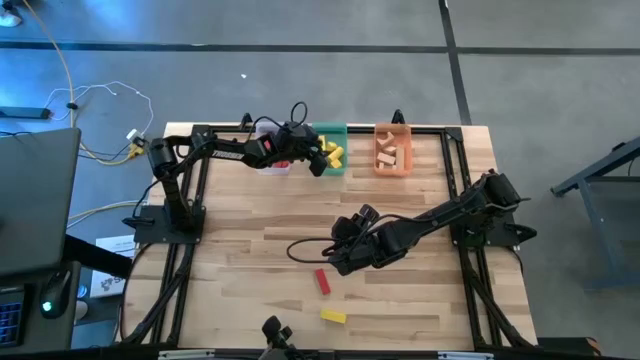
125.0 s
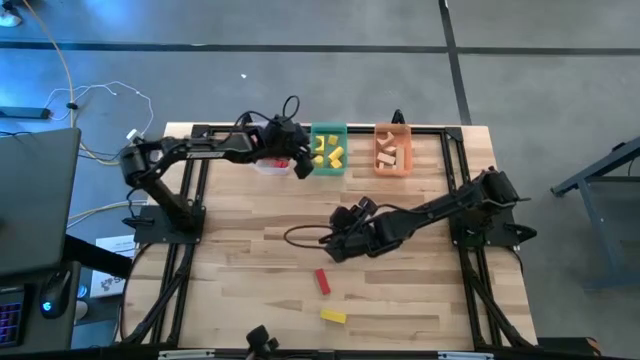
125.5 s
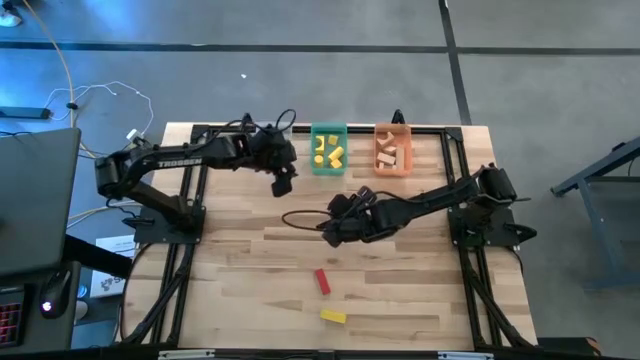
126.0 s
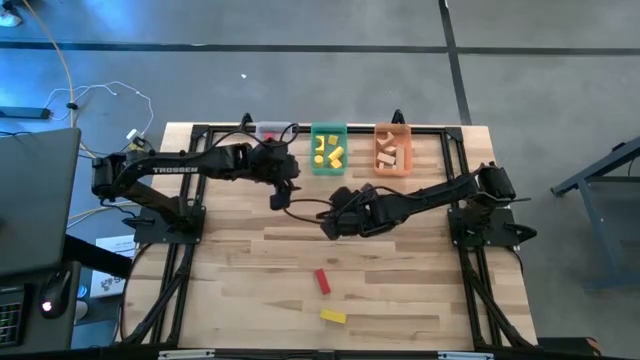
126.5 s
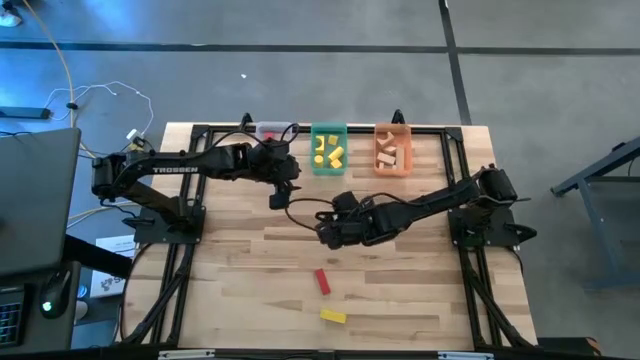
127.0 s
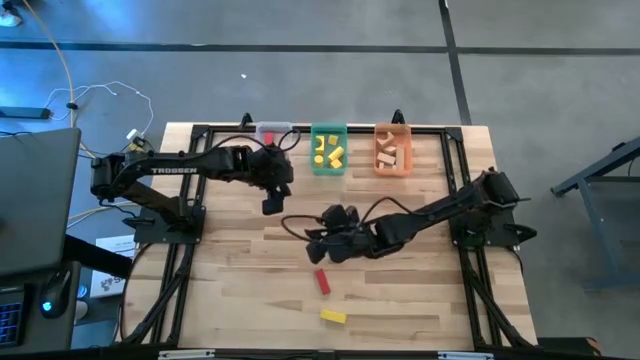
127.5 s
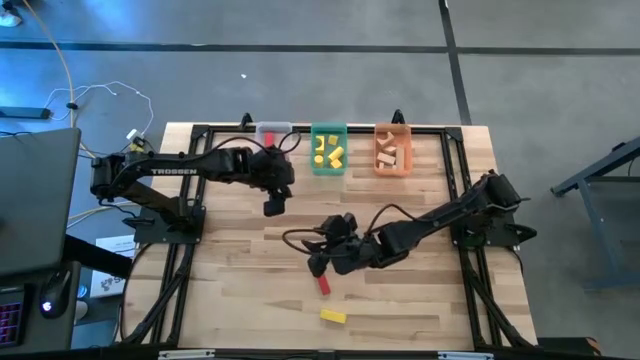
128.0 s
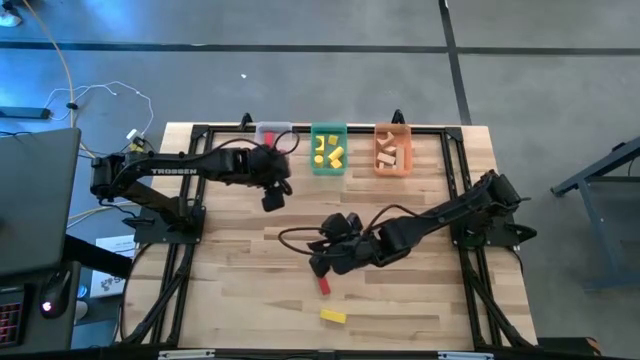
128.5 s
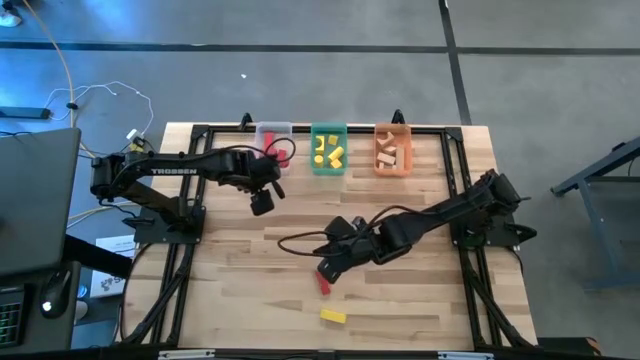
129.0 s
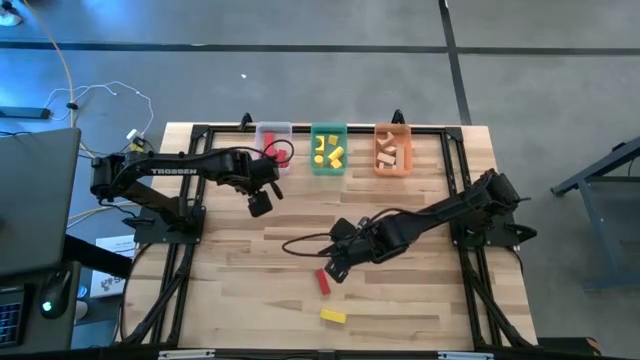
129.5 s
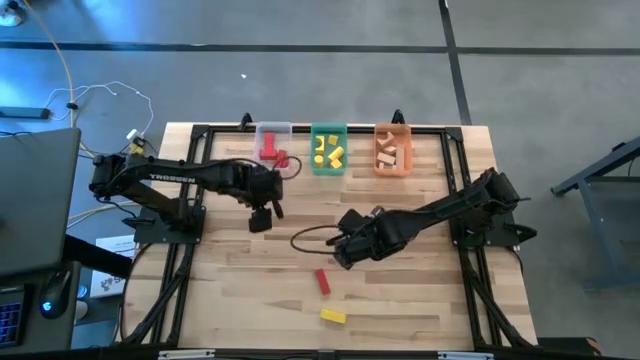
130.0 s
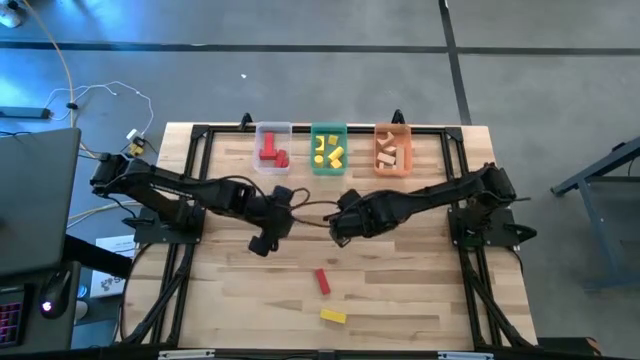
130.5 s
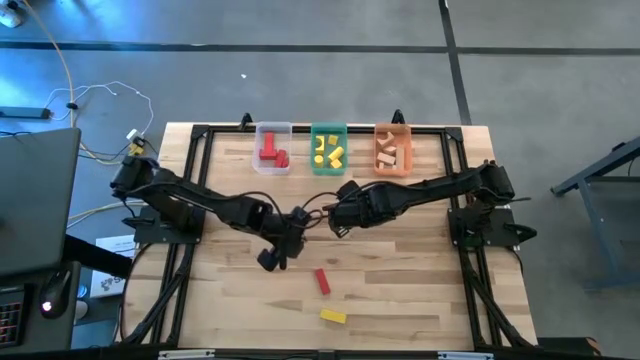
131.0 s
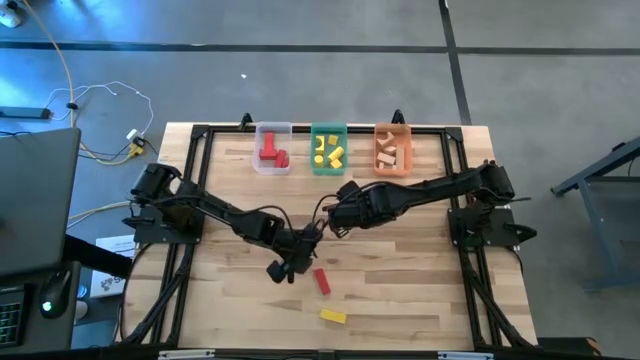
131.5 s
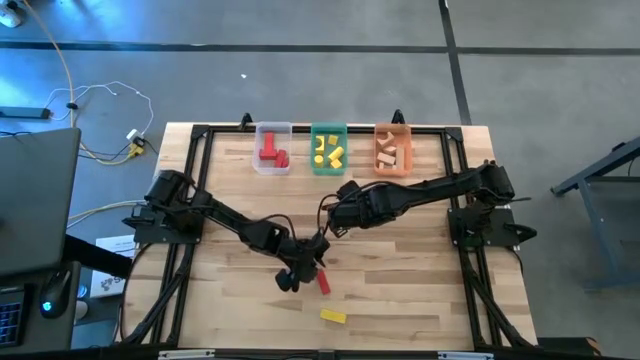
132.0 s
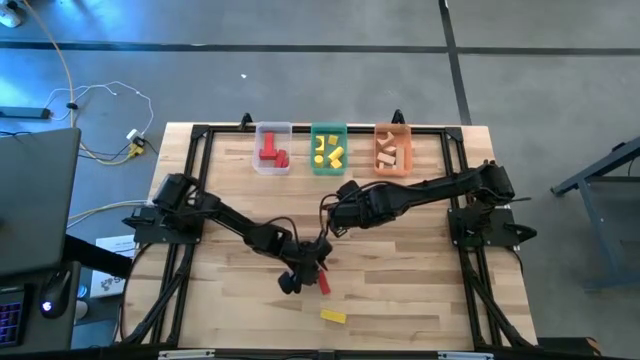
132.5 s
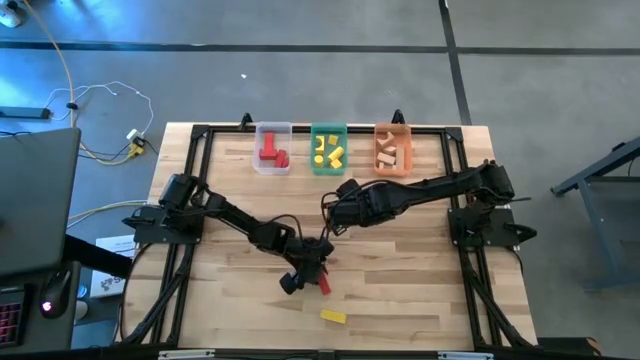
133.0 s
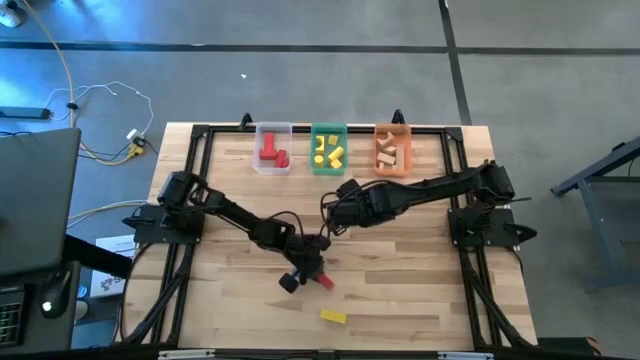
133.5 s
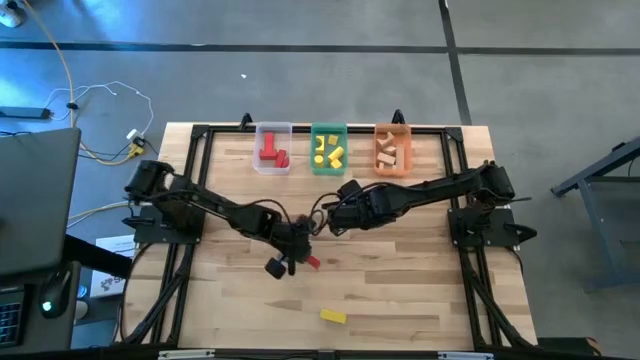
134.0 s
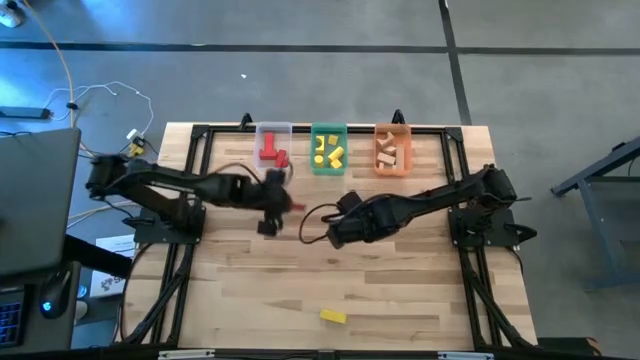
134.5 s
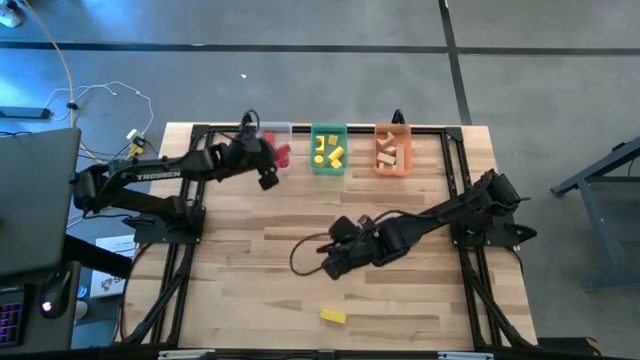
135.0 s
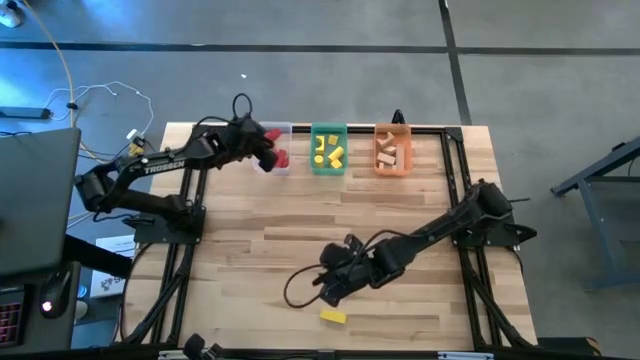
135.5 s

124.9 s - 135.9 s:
Task: Sort & place blocks by color
Put the red block into the white bin

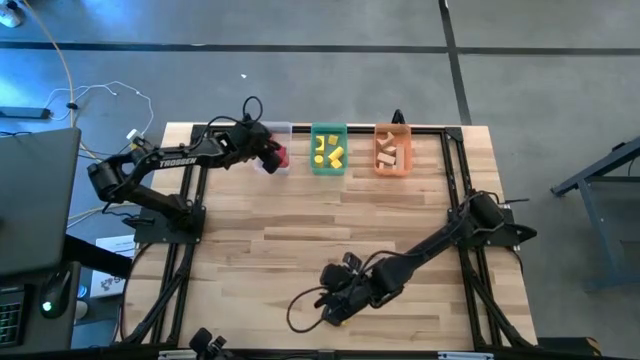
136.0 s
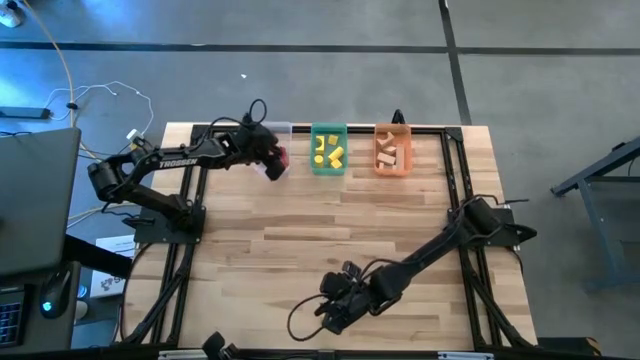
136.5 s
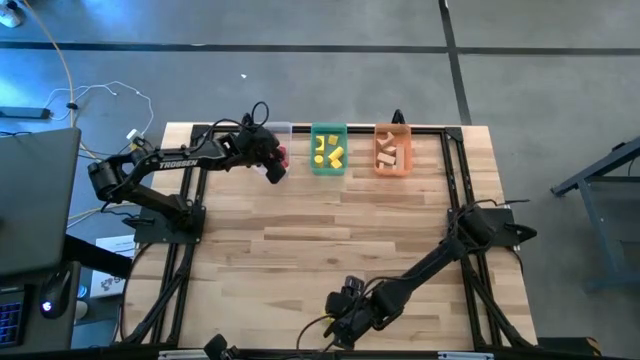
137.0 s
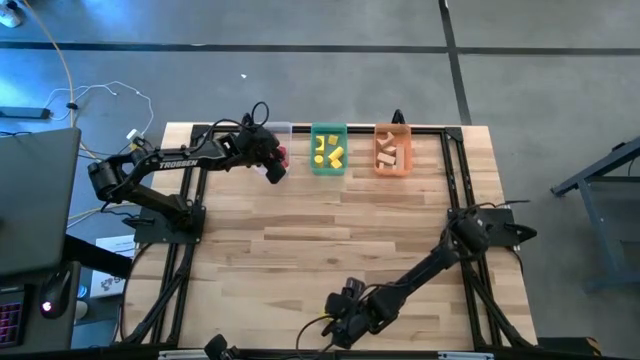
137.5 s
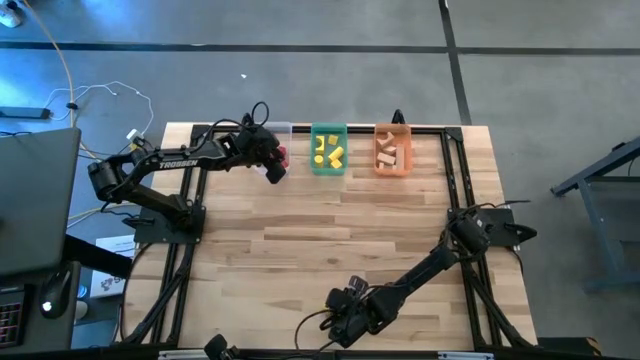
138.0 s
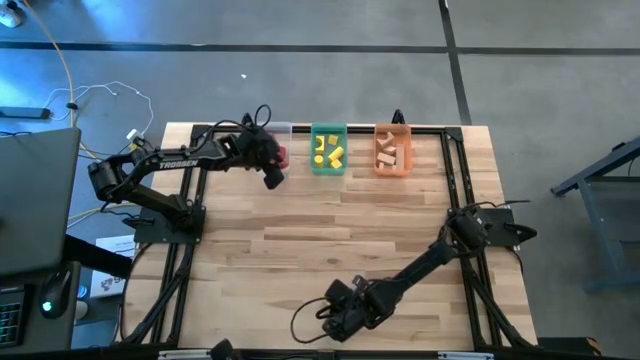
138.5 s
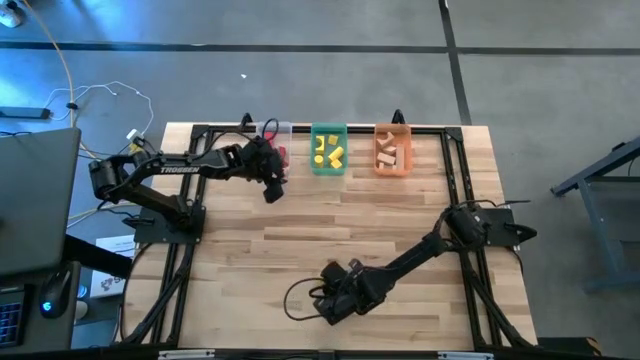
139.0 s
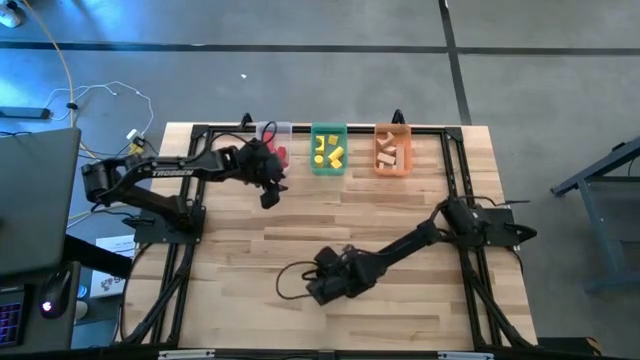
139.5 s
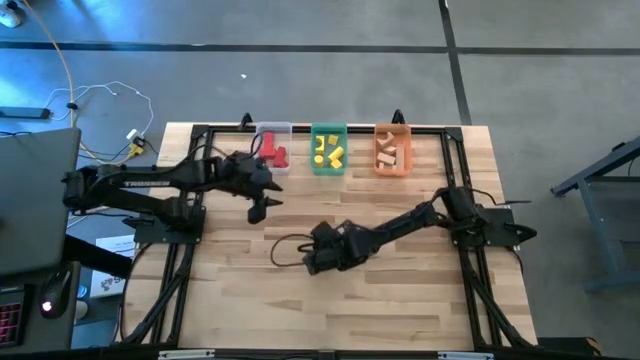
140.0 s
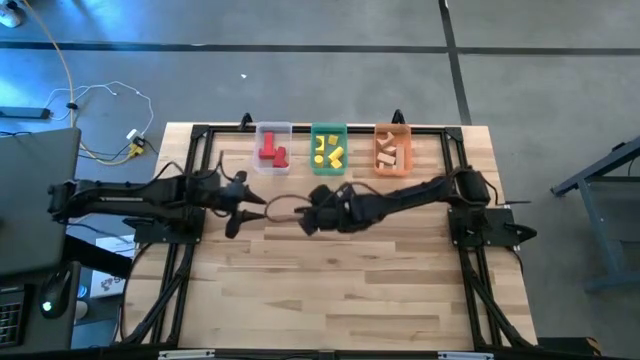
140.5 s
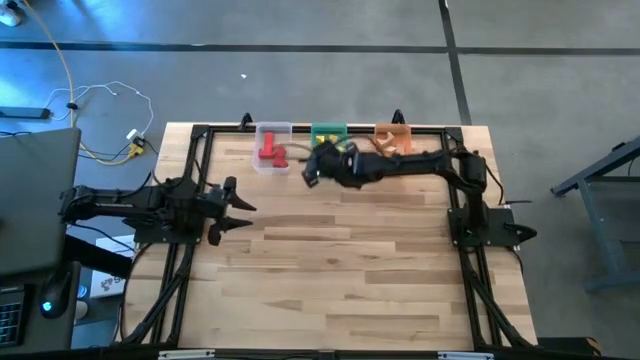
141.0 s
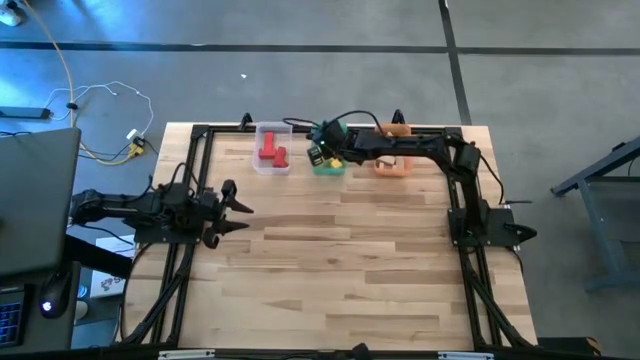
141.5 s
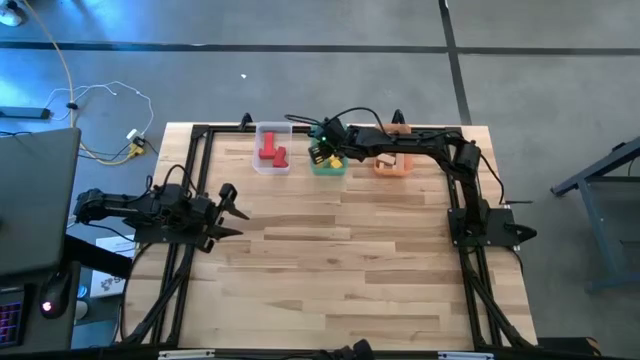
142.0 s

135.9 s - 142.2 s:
Put the yellow block into the green bin
